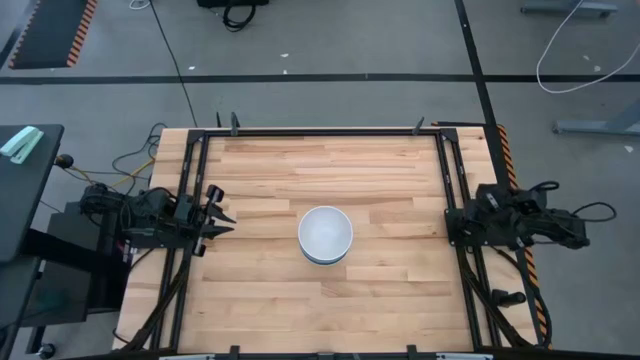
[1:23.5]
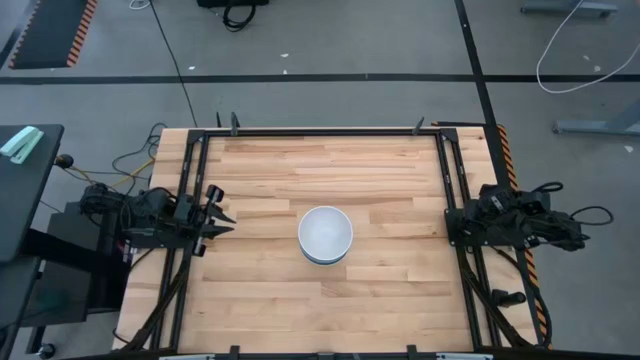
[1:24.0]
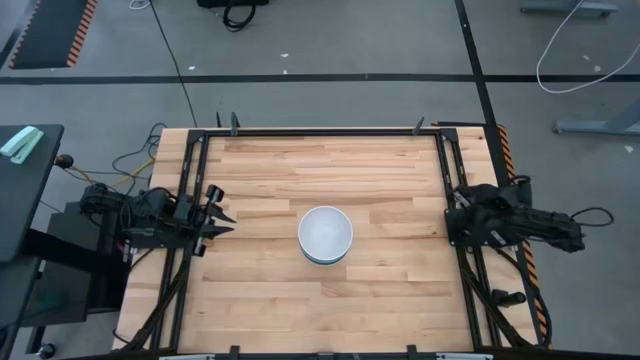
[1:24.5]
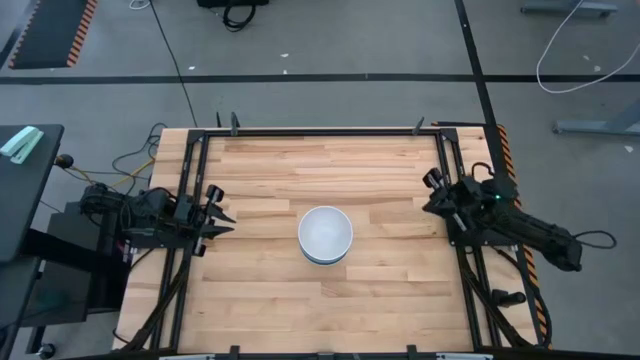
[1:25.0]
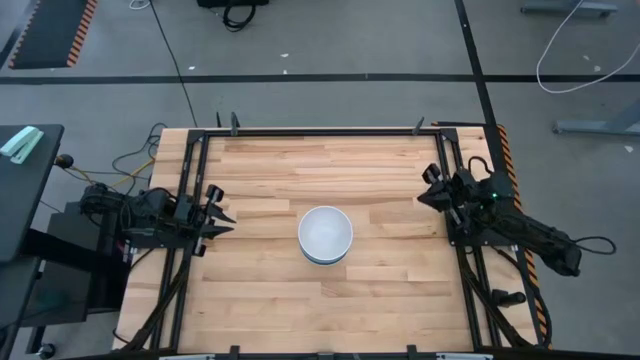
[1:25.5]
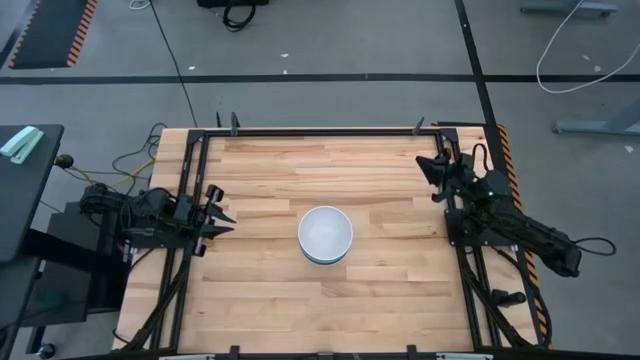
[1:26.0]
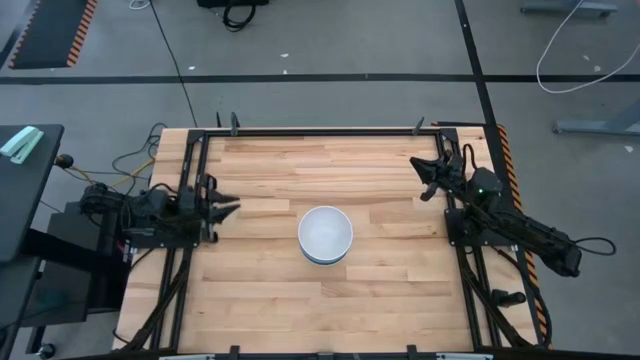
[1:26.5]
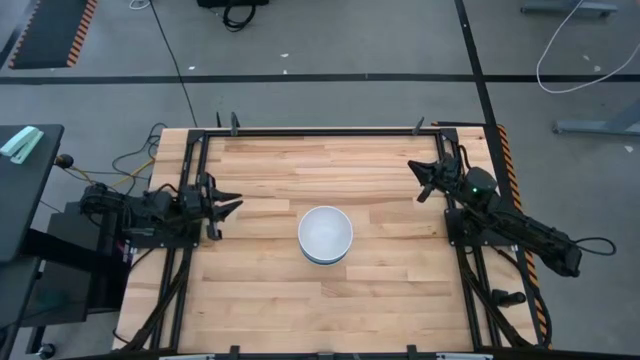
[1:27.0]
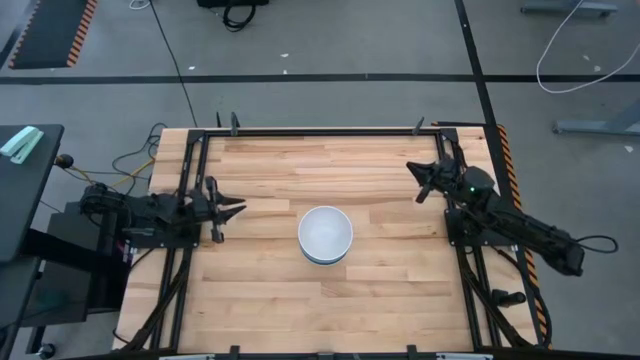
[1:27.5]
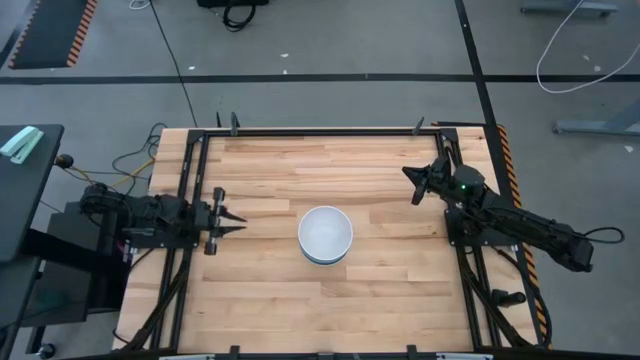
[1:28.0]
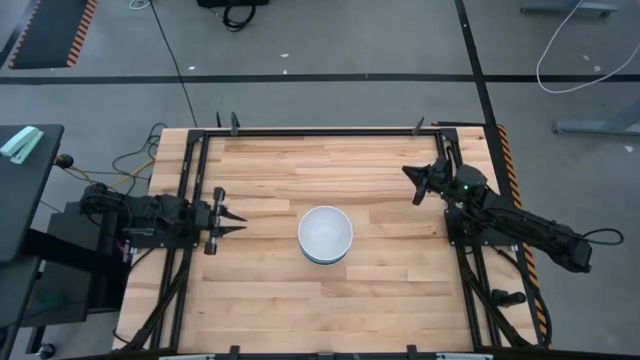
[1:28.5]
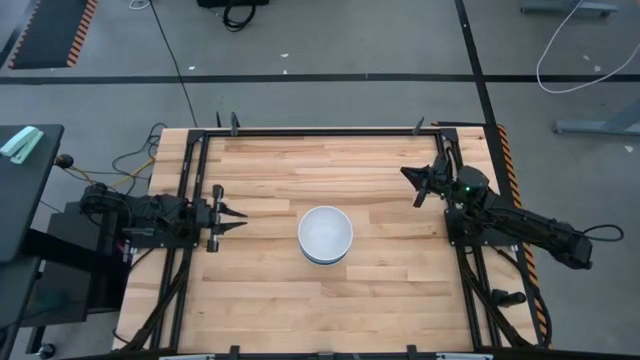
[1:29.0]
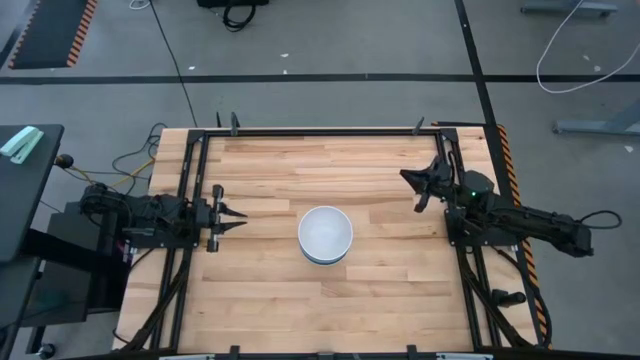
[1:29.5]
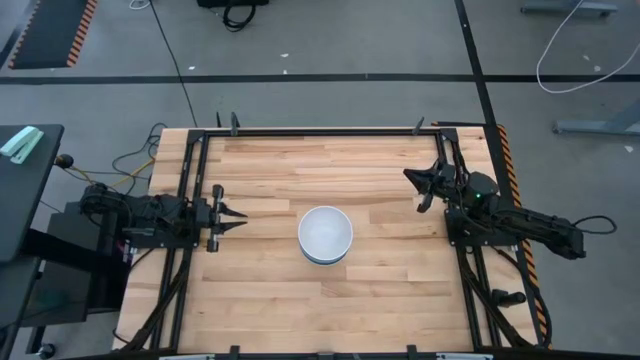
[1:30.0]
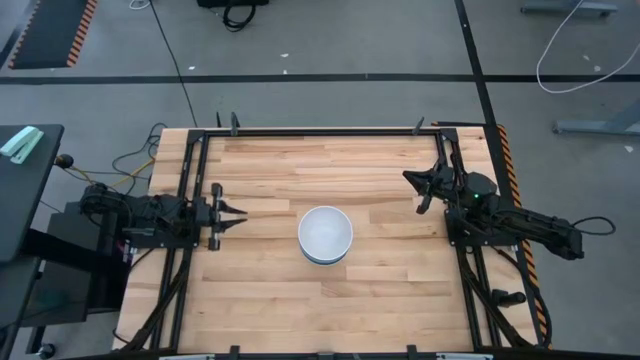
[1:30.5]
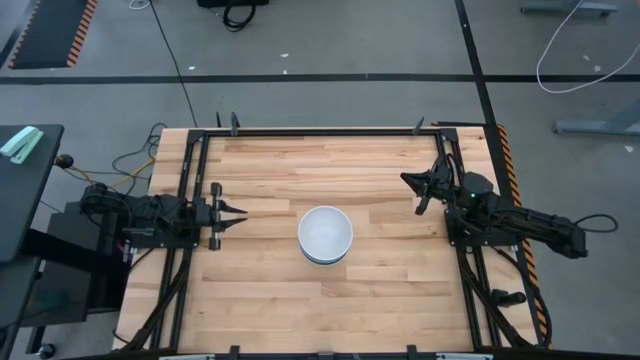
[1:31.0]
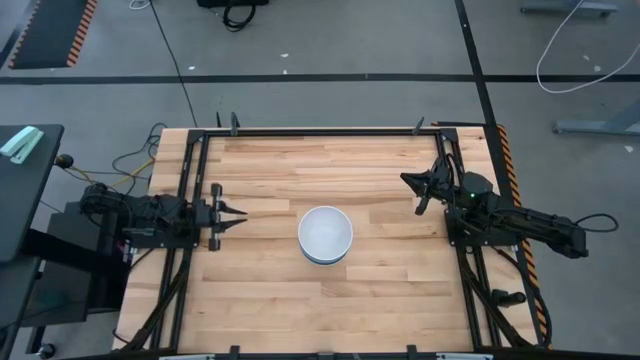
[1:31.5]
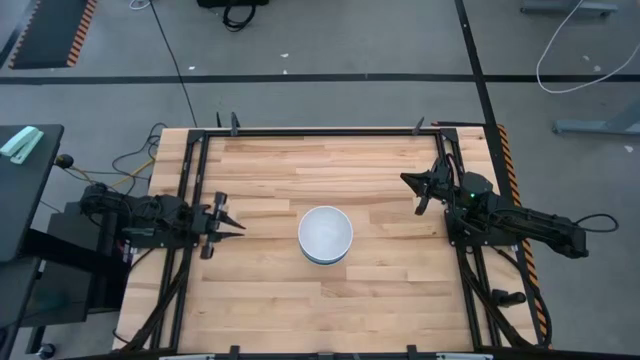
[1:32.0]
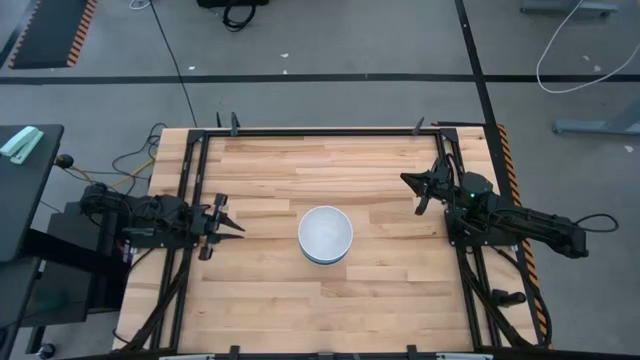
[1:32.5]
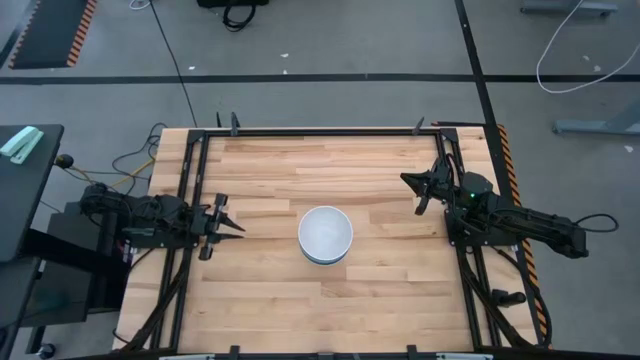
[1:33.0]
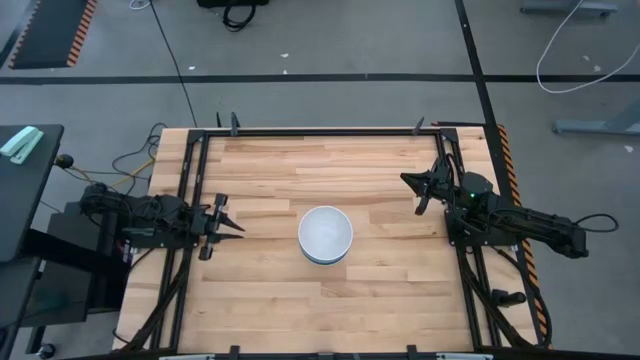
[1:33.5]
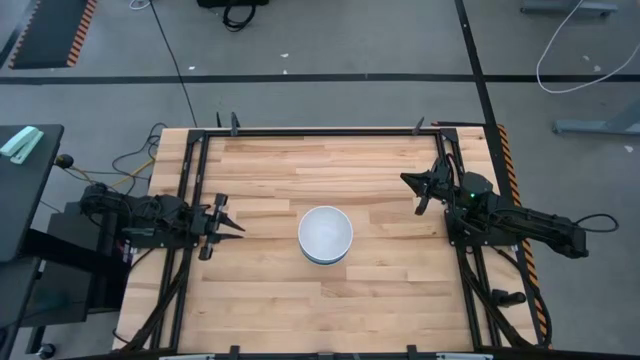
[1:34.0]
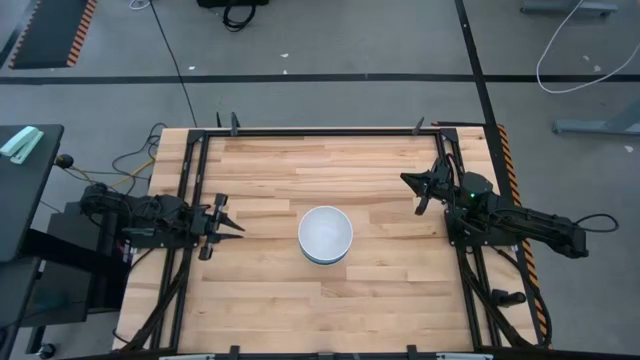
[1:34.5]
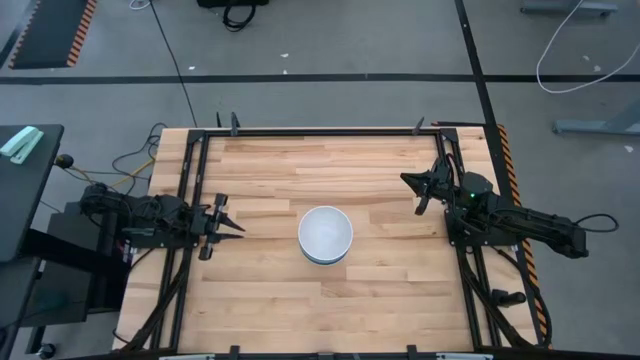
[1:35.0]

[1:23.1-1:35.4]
Task: Nest bowls inside each other
Return to Home Position

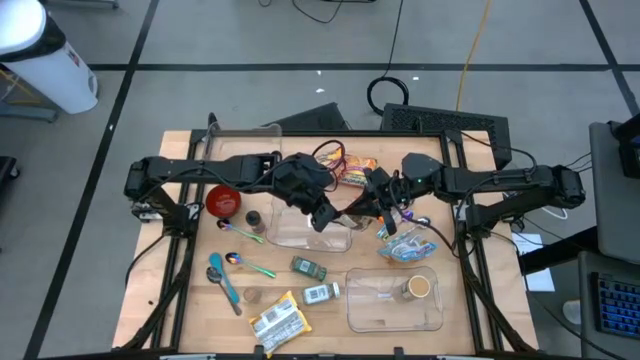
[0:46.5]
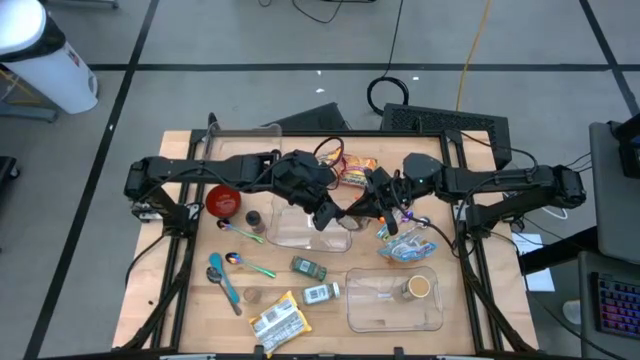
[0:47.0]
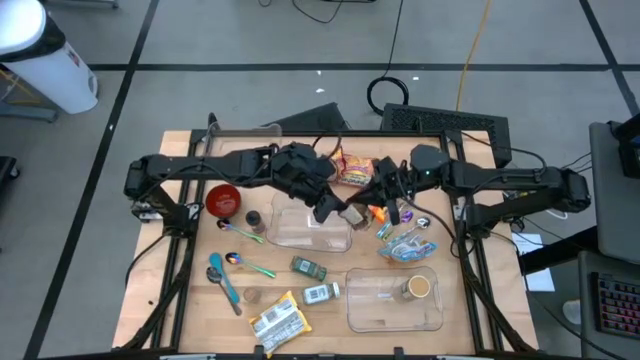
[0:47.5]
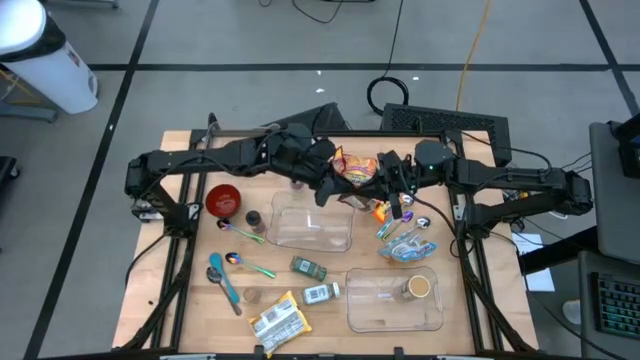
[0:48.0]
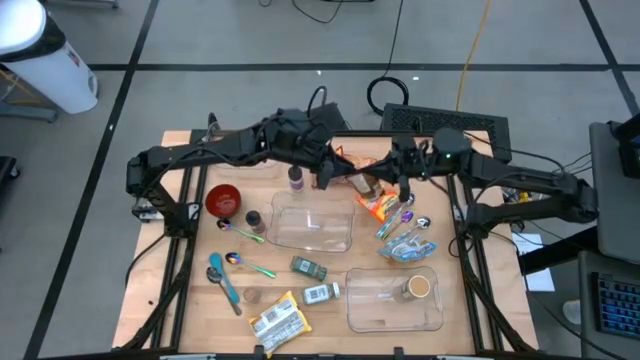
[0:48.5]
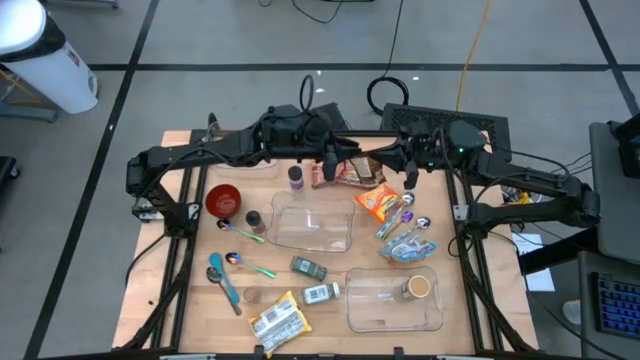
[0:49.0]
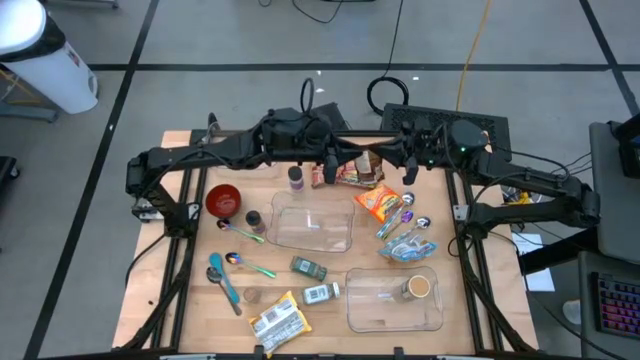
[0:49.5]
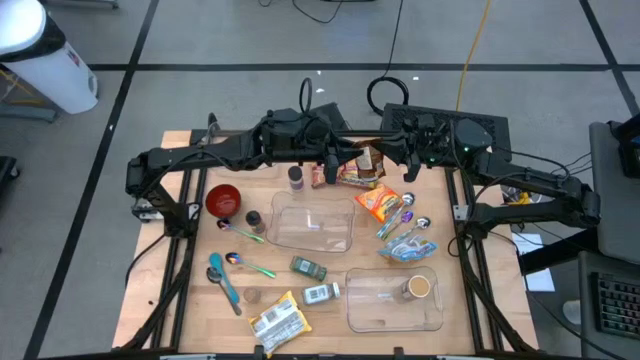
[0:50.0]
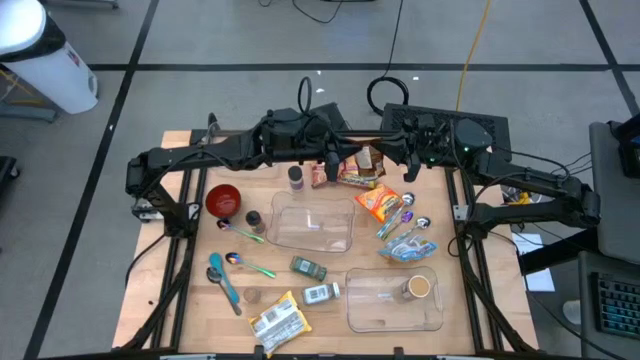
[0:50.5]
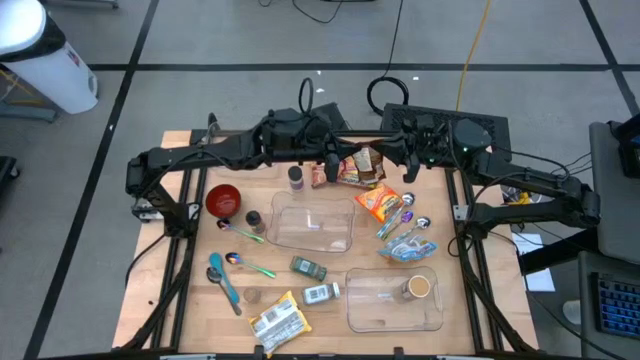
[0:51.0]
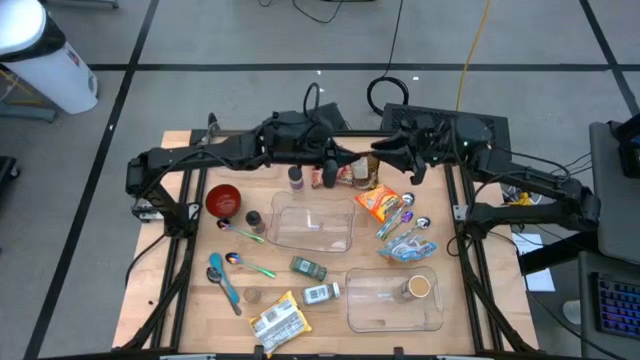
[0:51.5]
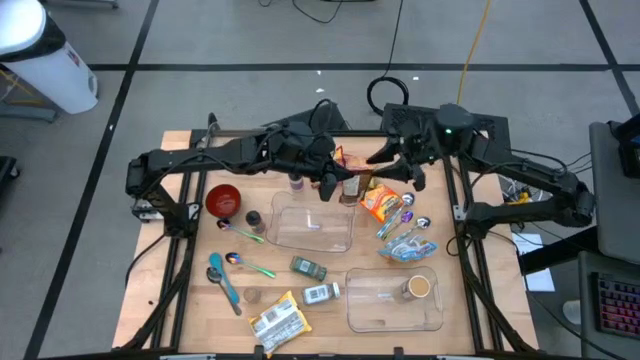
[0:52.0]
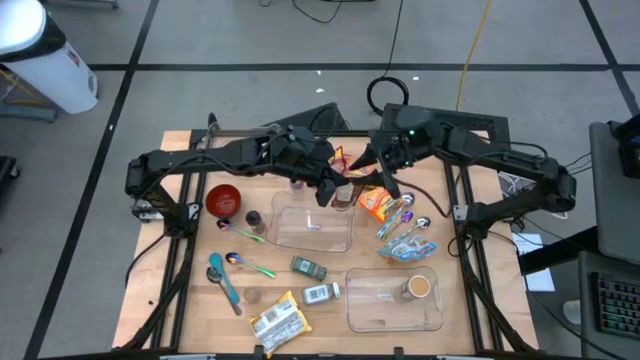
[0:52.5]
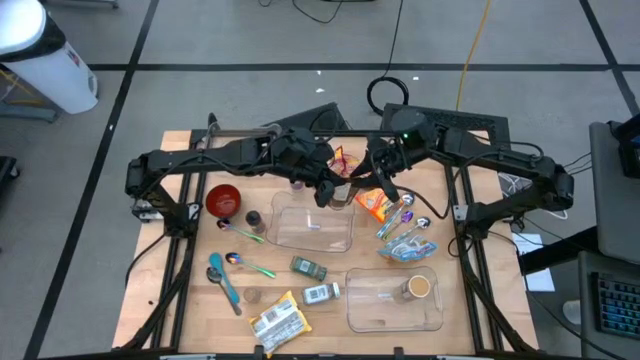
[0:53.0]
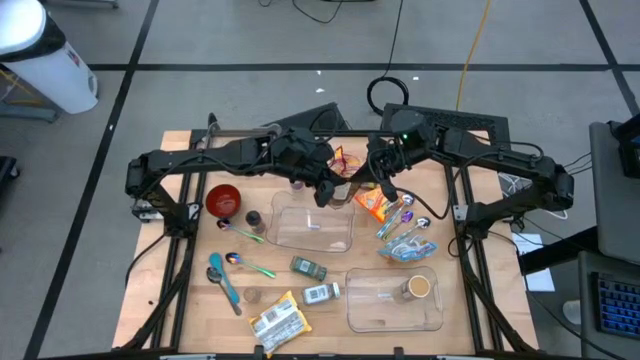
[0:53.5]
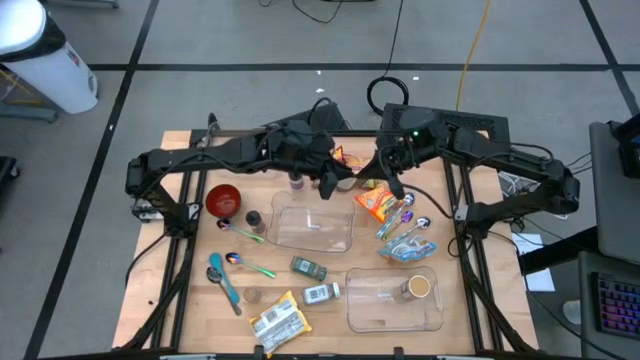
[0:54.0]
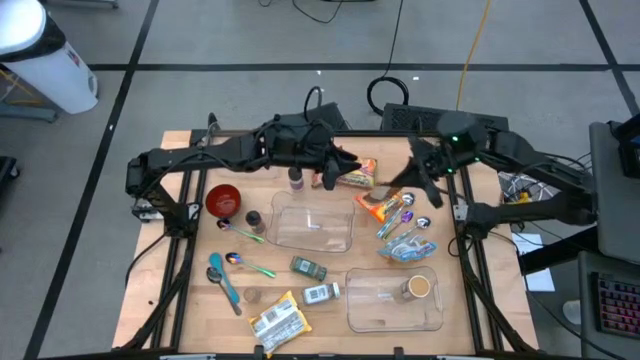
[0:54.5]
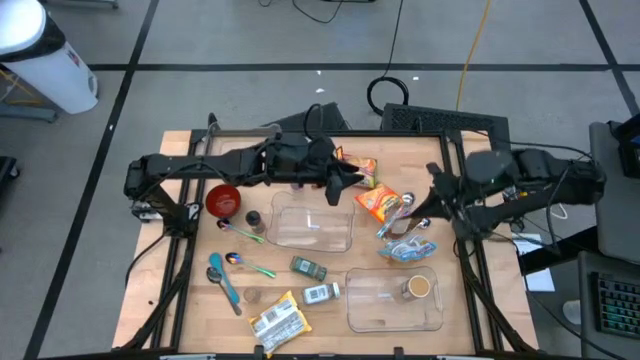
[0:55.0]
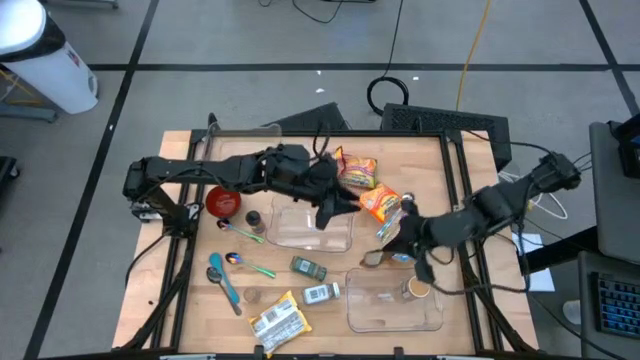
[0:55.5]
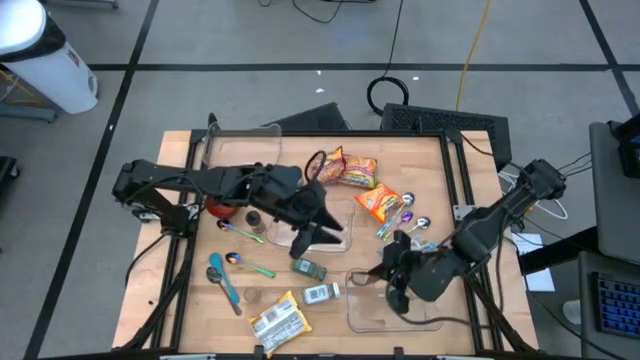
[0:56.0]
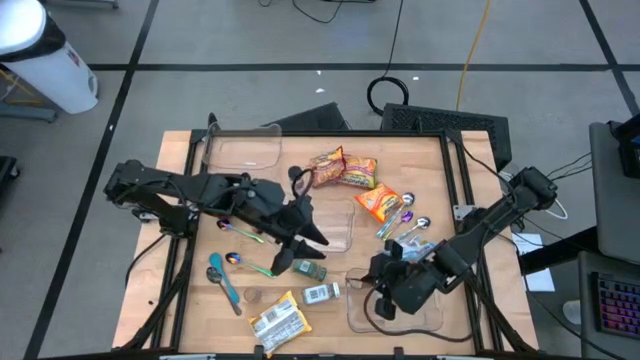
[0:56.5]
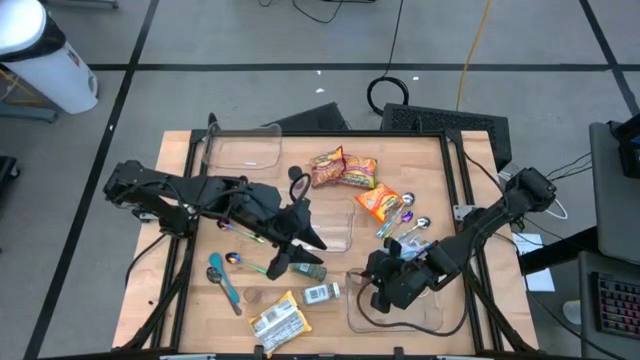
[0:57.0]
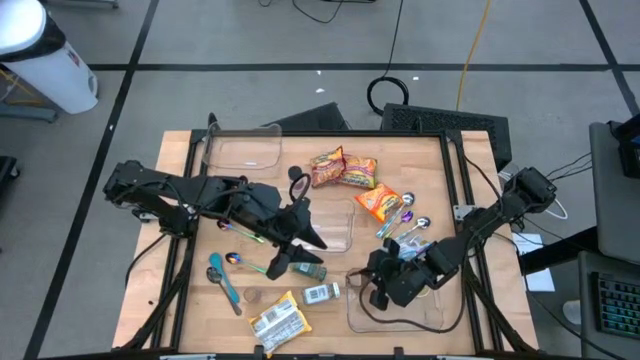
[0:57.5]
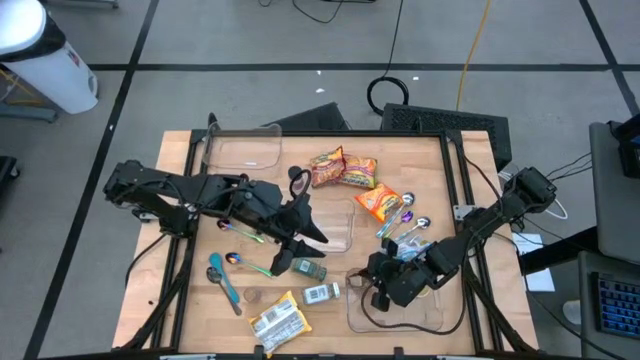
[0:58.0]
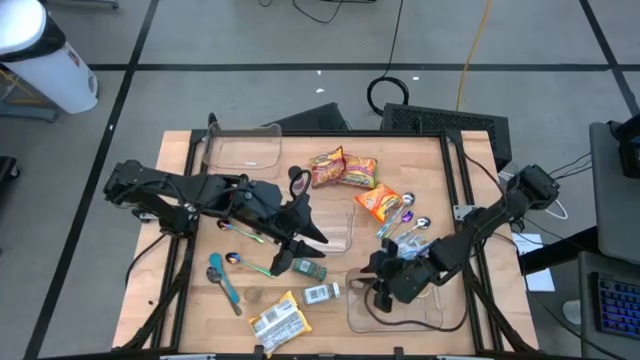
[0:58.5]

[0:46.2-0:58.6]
Task: Pick & Place Food Item
Put the orange seasoning pack into the bottom transparent bin
